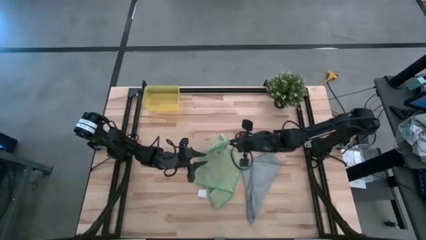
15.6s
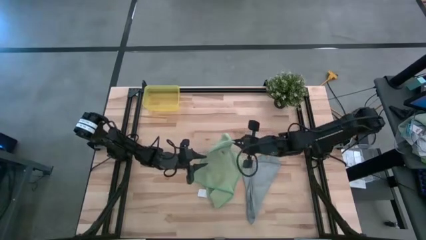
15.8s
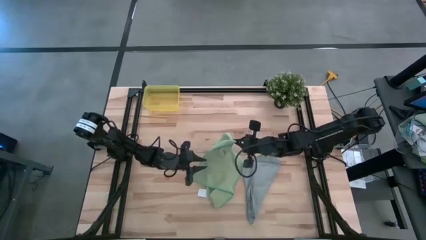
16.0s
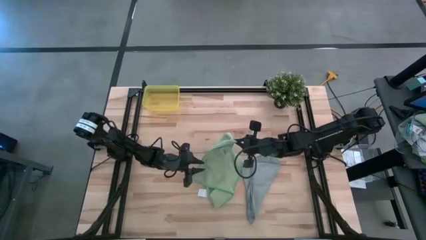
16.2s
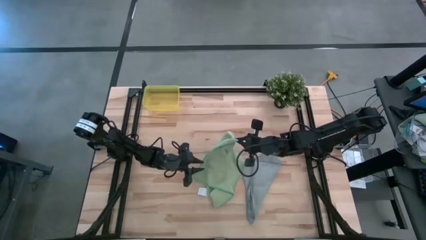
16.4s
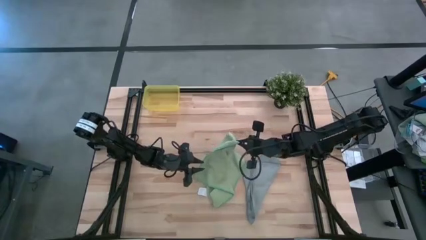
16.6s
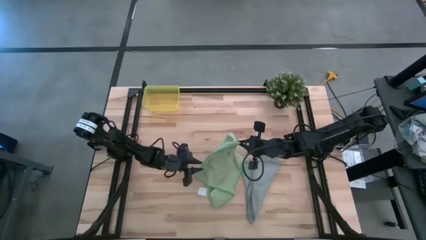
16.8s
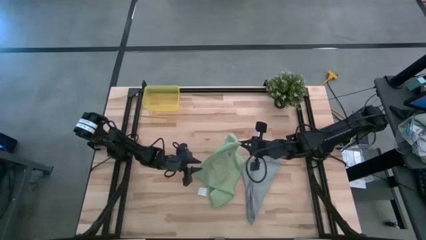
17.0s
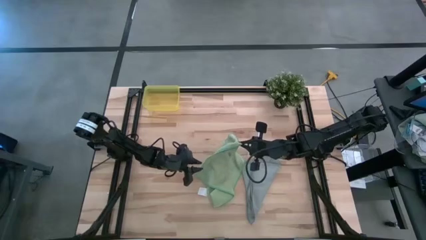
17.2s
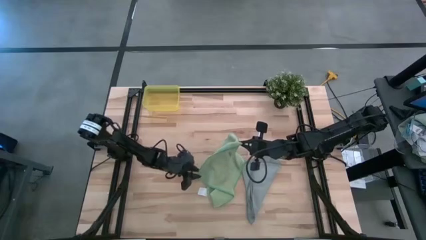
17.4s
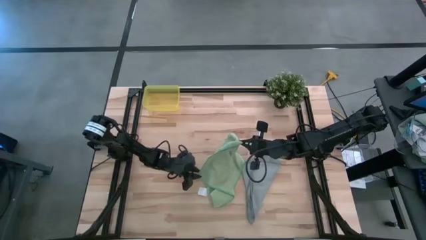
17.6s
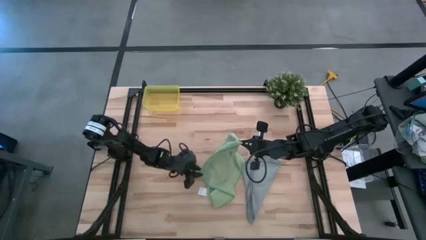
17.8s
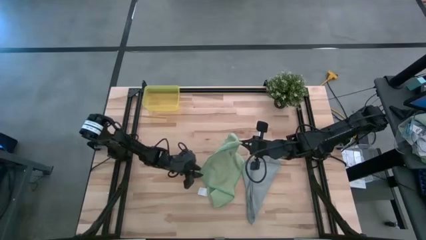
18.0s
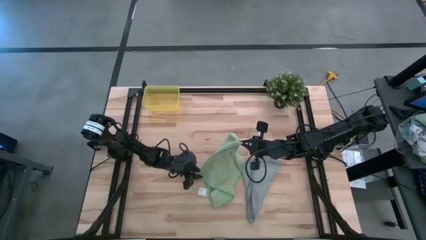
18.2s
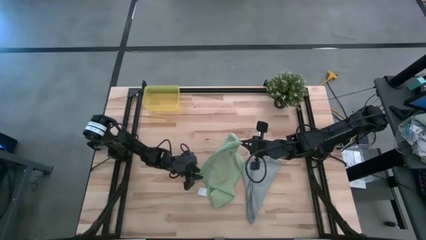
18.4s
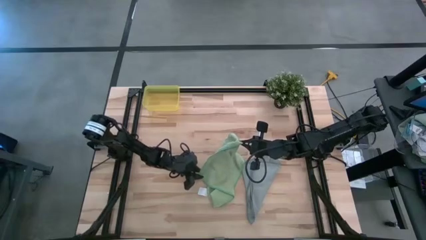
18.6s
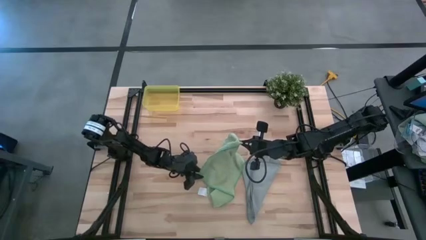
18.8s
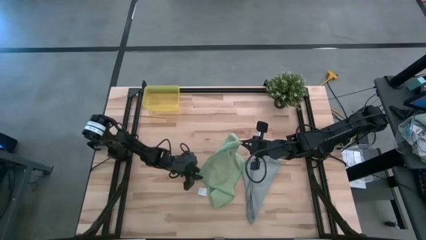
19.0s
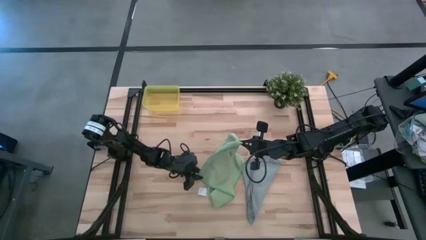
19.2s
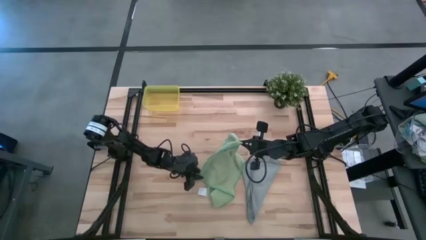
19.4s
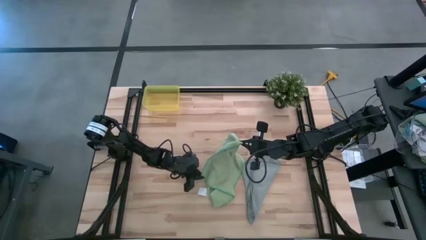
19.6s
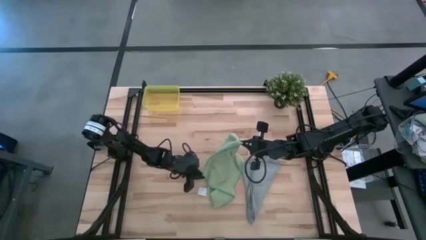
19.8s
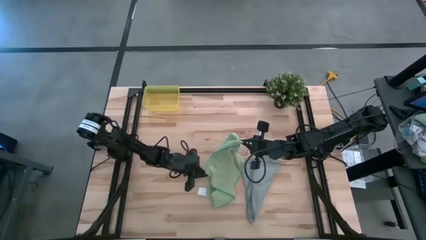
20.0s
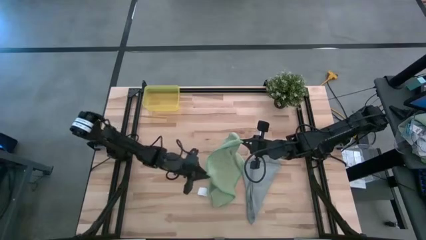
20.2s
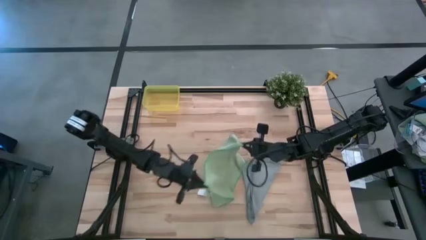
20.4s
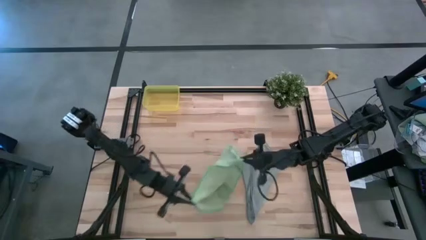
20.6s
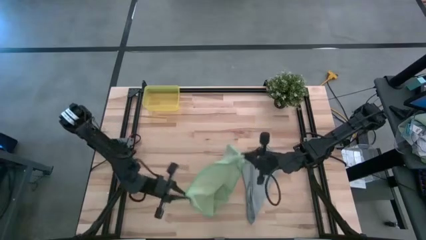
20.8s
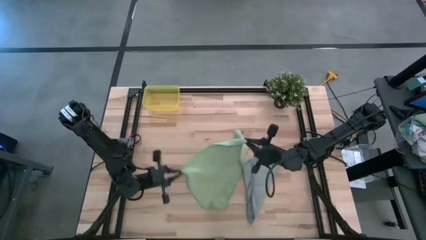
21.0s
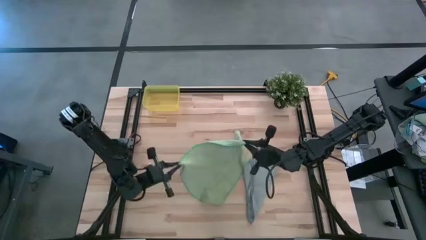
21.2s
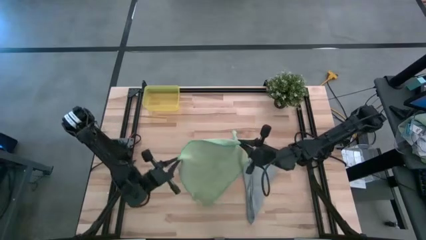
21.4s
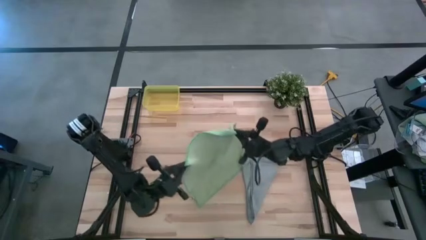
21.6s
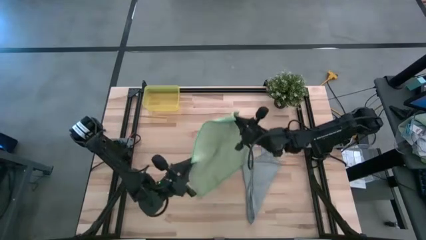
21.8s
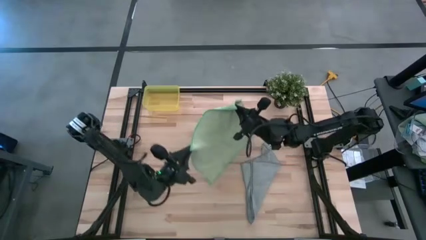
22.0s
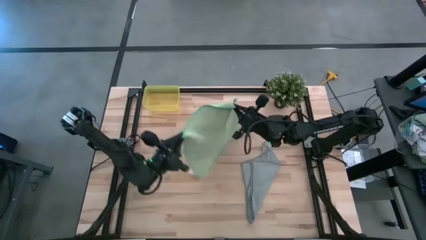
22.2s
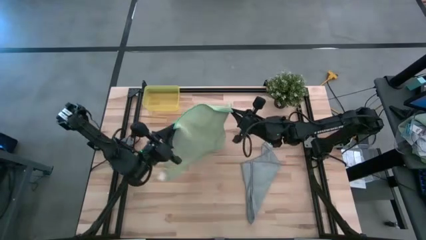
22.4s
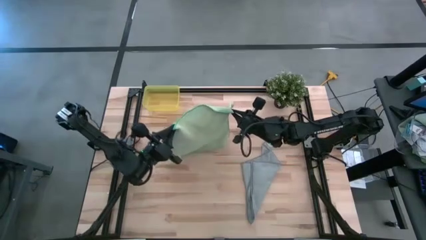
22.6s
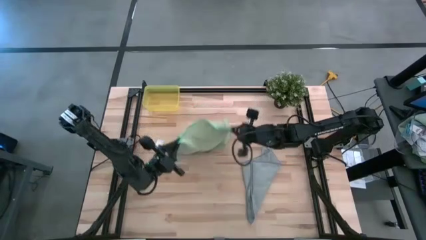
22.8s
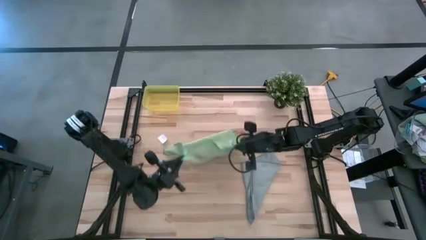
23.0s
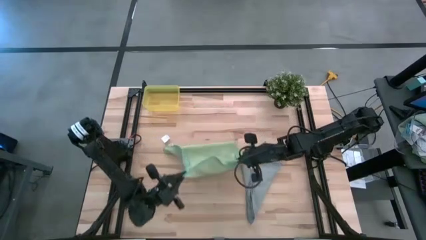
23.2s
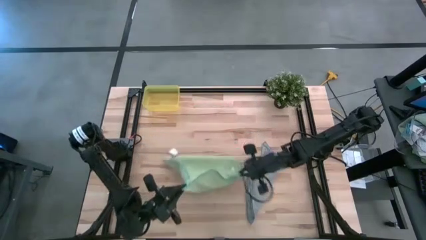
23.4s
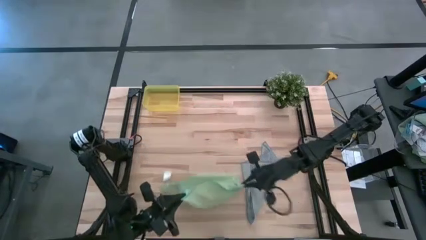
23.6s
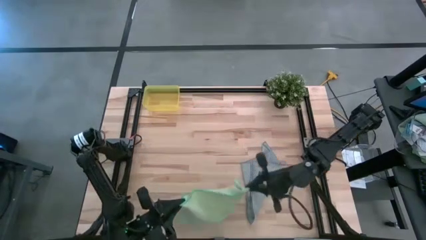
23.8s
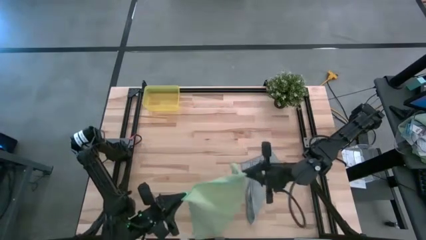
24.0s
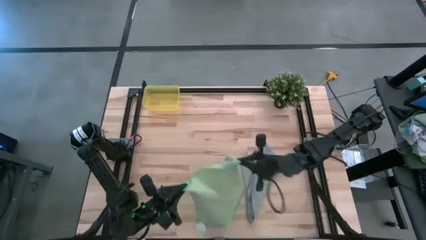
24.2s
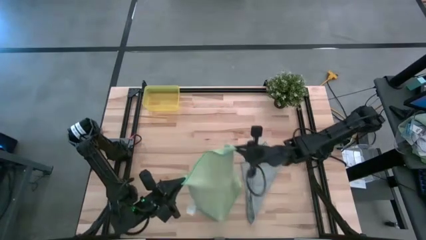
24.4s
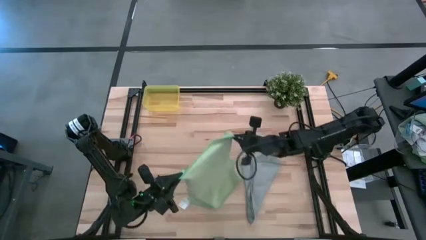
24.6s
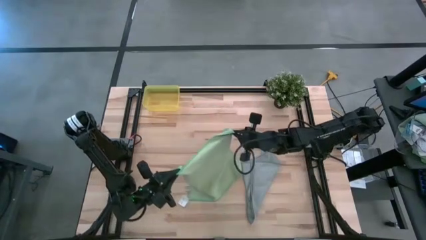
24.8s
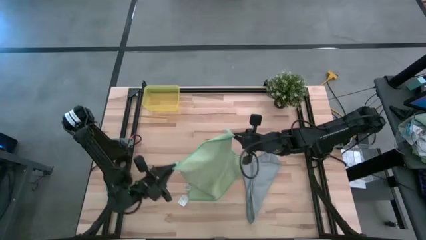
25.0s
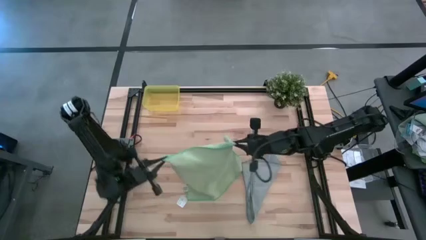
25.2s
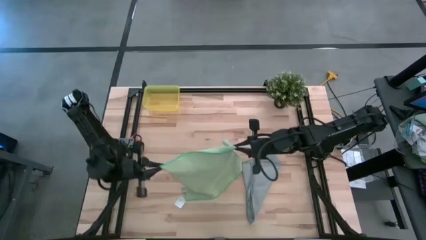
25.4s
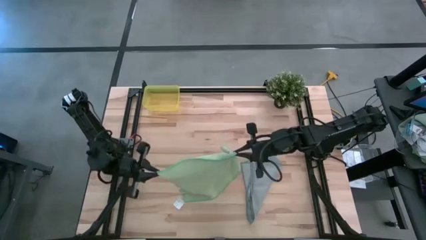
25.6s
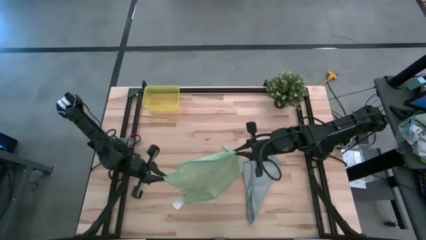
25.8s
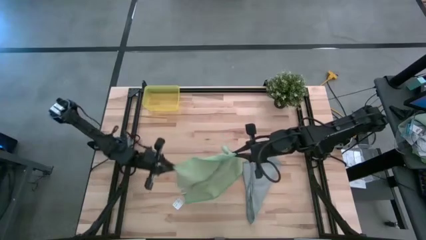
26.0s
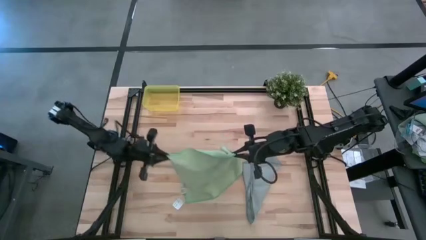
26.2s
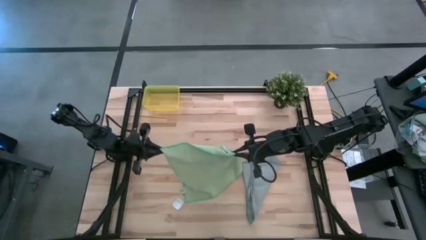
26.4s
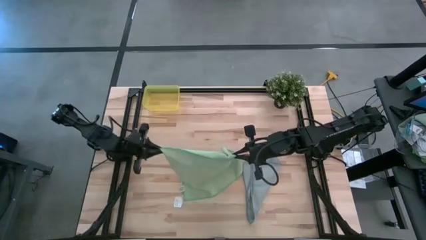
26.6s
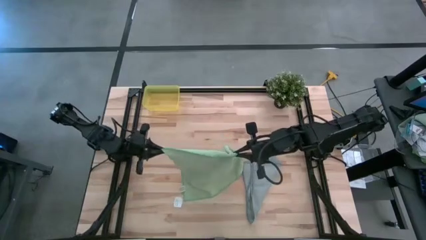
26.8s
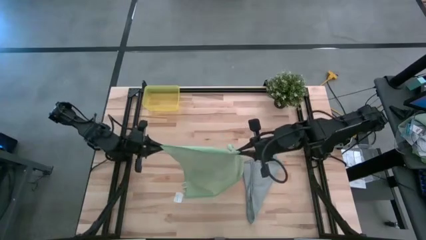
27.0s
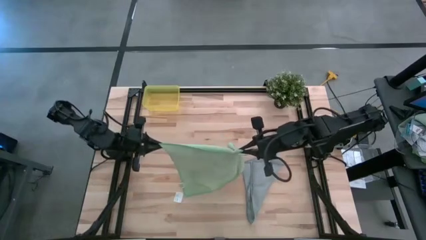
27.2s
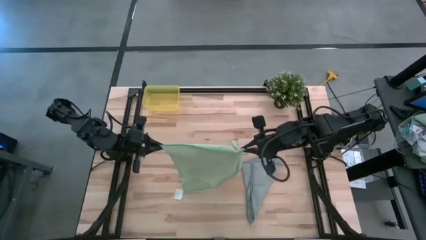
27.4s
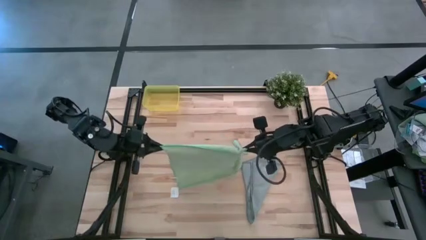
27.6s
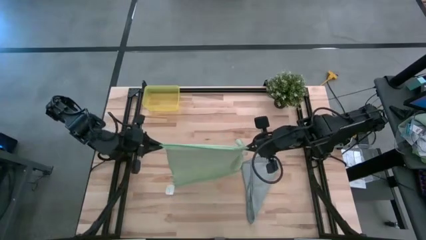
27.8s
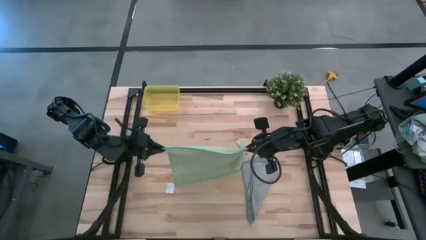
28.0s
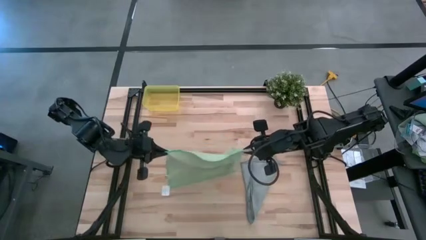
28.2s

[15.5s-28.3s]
Task: Roll microfiber towels into tight, uniform cylinder then place into a basket
Fold the green towel
